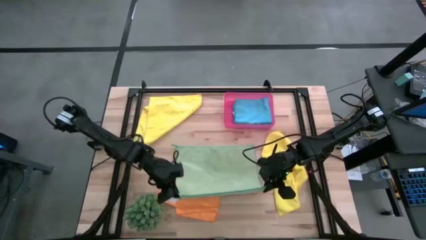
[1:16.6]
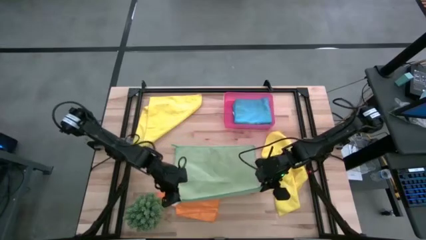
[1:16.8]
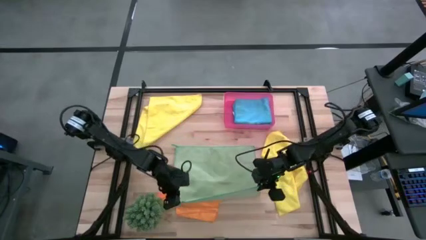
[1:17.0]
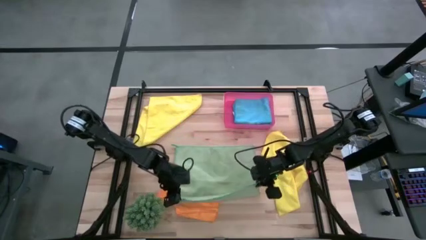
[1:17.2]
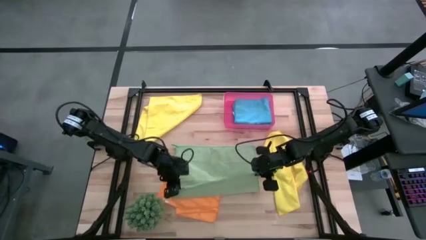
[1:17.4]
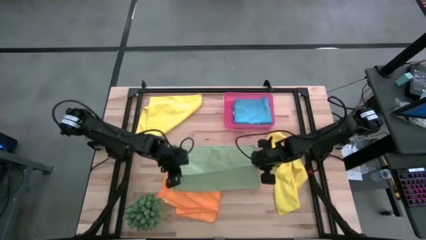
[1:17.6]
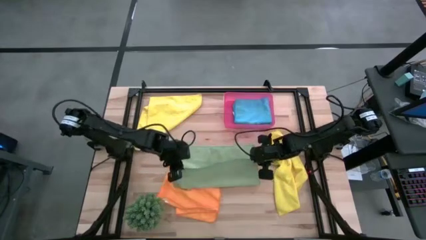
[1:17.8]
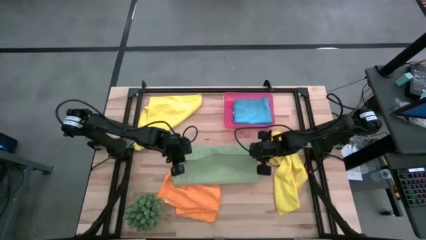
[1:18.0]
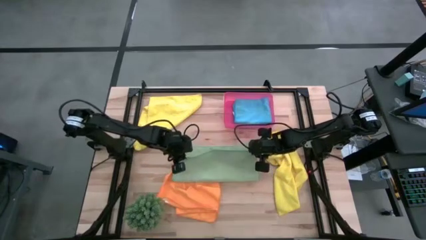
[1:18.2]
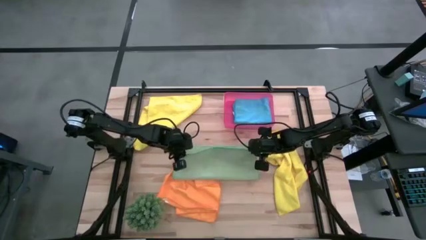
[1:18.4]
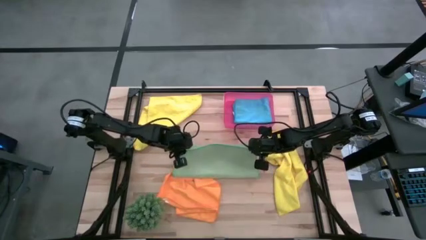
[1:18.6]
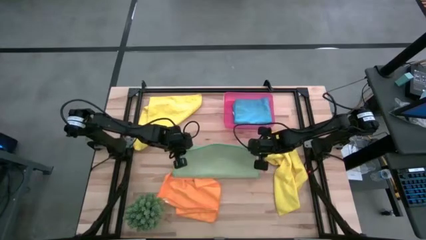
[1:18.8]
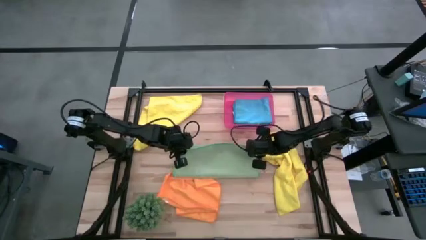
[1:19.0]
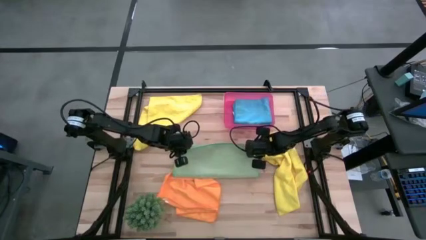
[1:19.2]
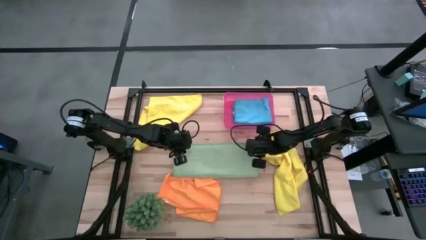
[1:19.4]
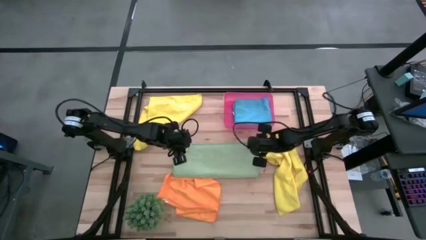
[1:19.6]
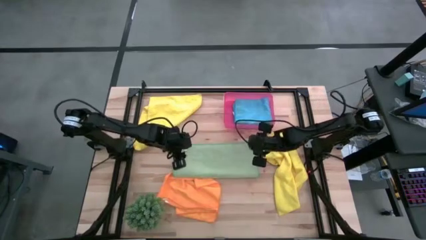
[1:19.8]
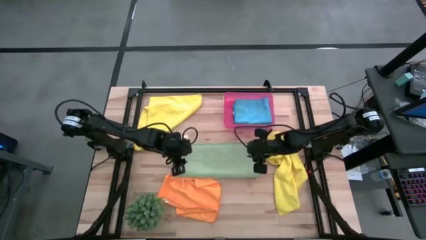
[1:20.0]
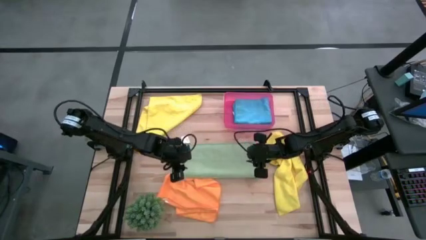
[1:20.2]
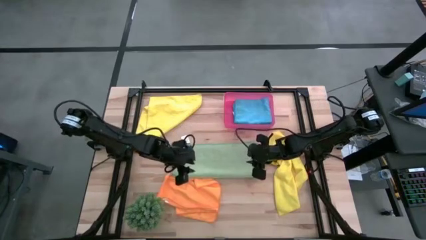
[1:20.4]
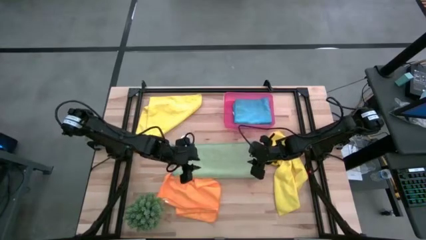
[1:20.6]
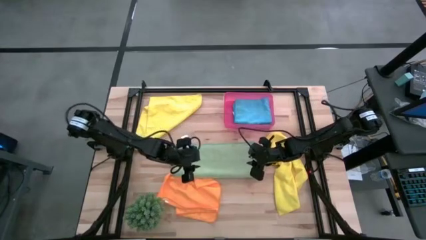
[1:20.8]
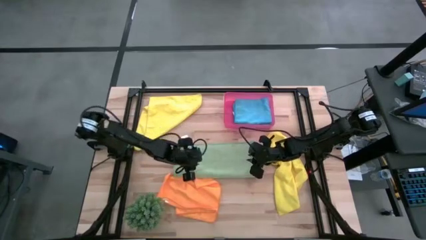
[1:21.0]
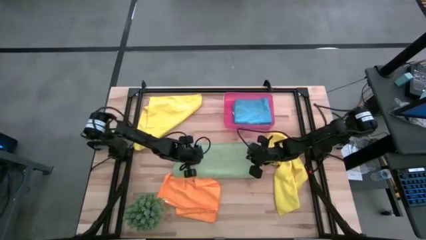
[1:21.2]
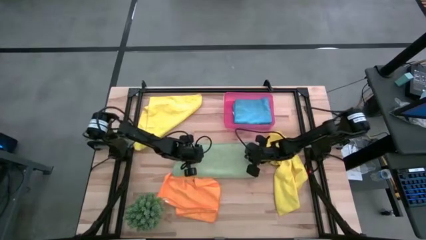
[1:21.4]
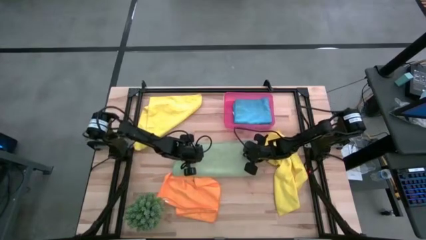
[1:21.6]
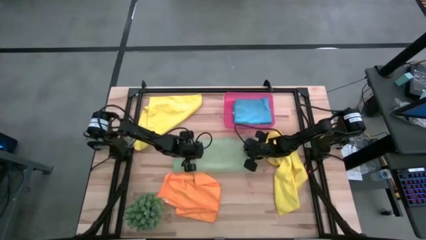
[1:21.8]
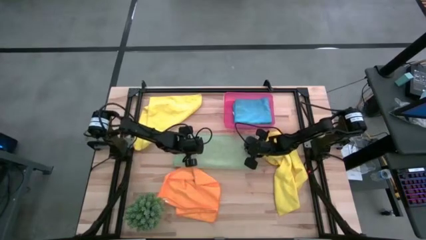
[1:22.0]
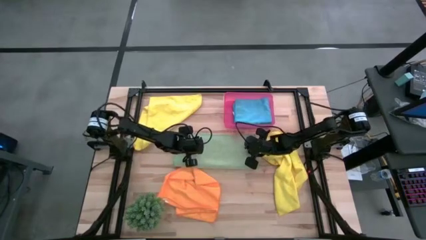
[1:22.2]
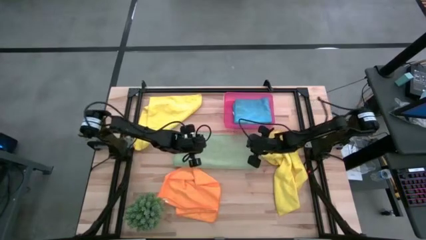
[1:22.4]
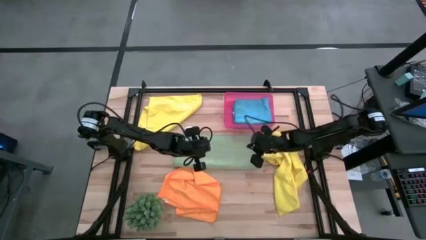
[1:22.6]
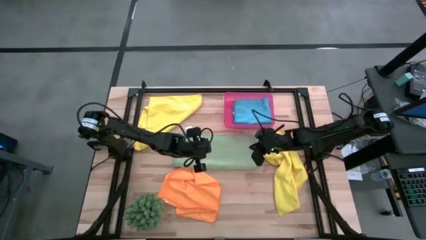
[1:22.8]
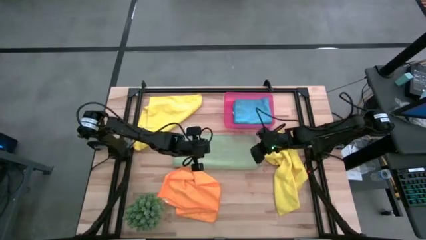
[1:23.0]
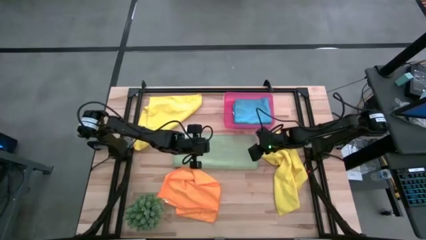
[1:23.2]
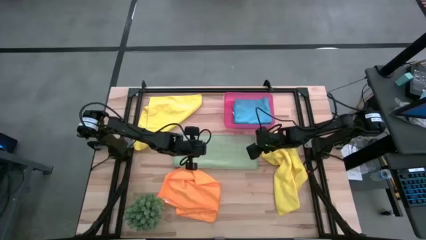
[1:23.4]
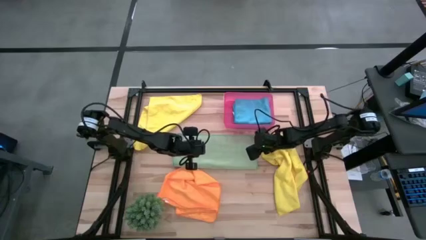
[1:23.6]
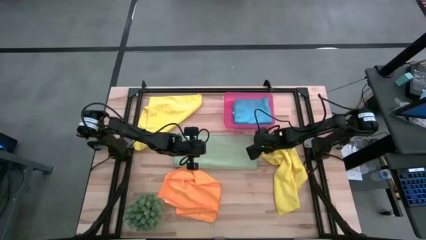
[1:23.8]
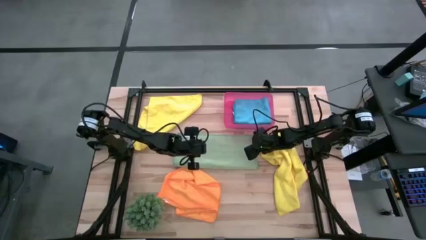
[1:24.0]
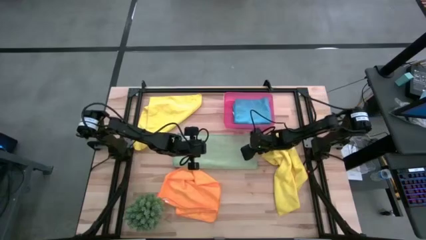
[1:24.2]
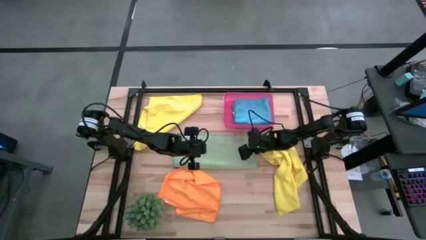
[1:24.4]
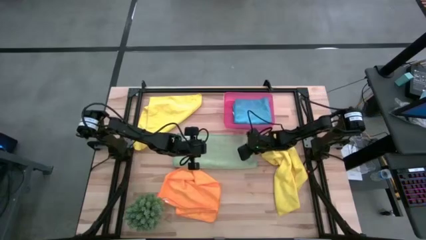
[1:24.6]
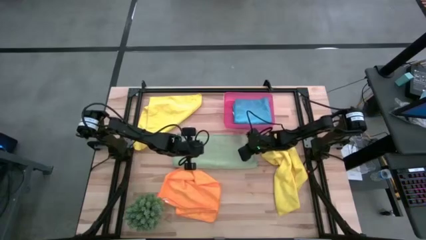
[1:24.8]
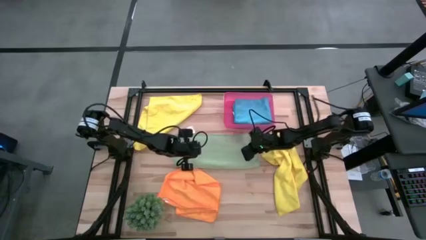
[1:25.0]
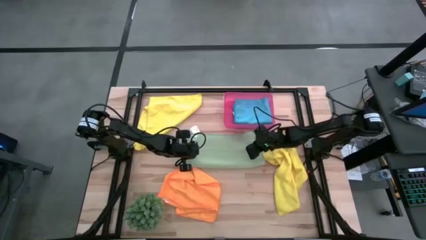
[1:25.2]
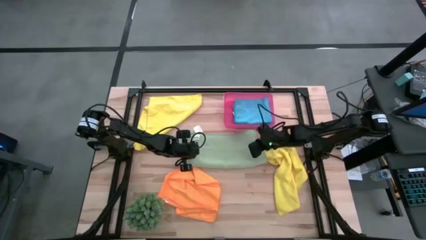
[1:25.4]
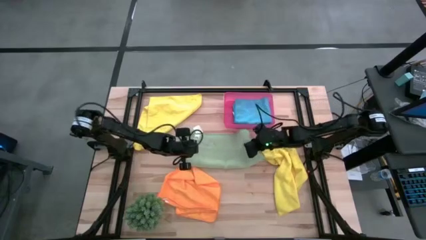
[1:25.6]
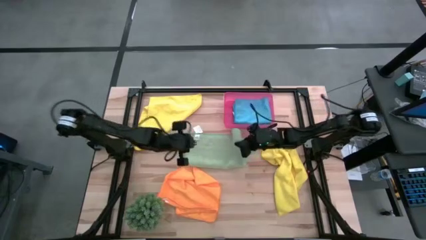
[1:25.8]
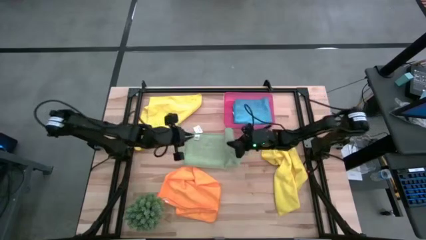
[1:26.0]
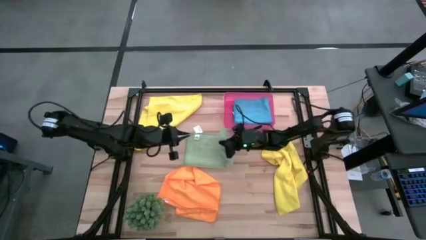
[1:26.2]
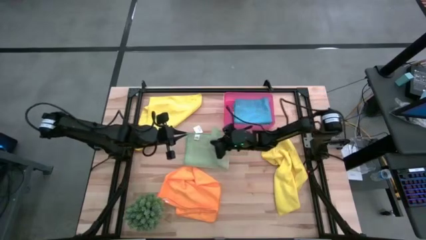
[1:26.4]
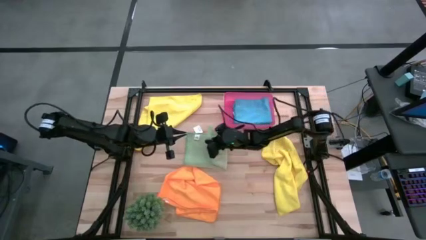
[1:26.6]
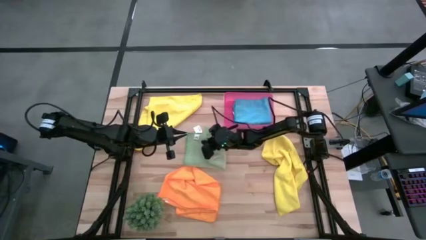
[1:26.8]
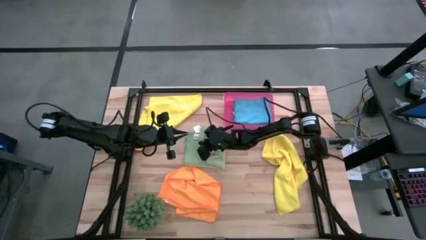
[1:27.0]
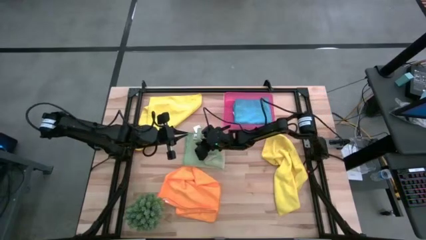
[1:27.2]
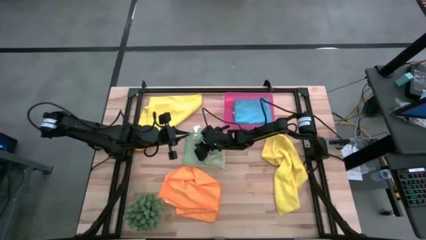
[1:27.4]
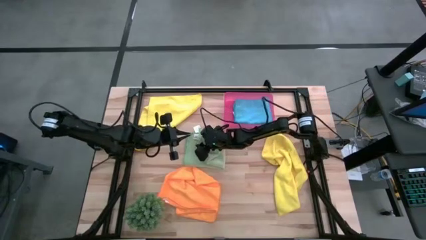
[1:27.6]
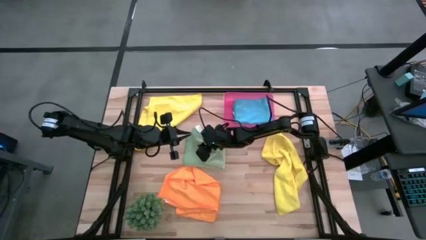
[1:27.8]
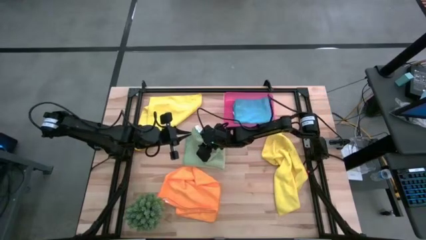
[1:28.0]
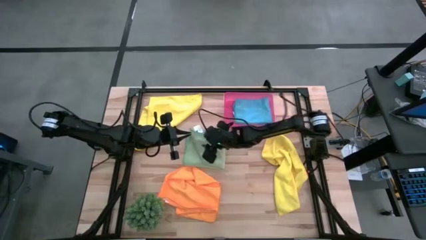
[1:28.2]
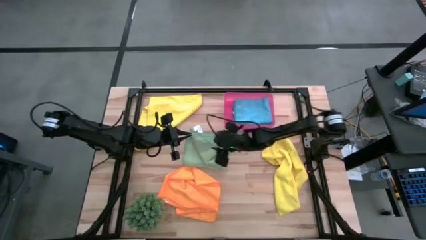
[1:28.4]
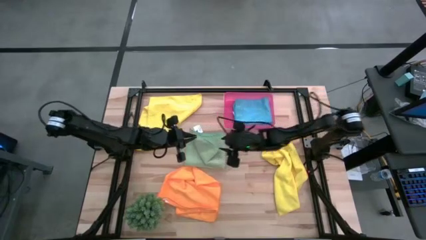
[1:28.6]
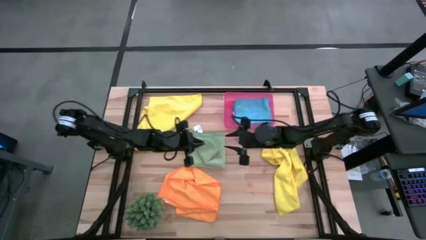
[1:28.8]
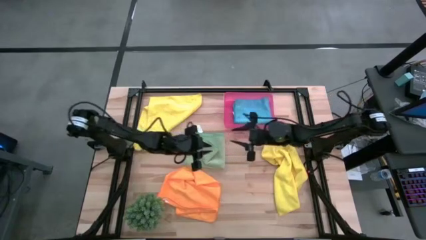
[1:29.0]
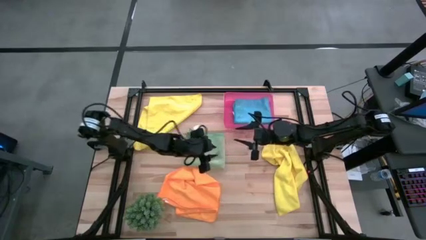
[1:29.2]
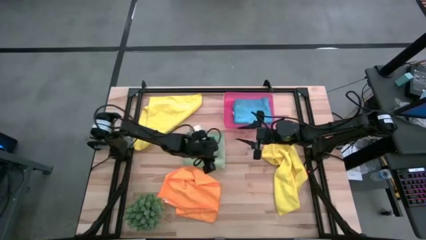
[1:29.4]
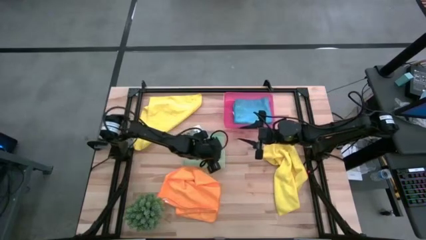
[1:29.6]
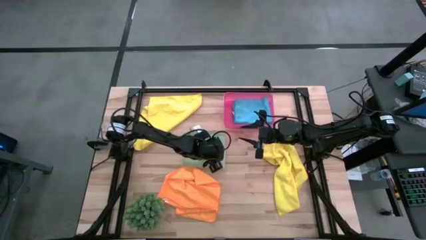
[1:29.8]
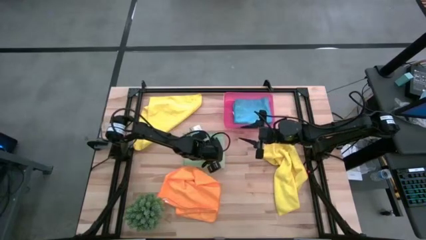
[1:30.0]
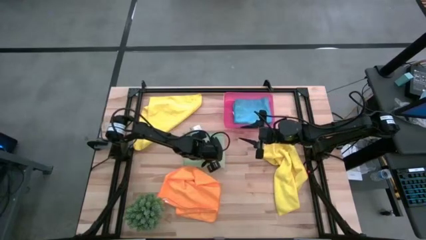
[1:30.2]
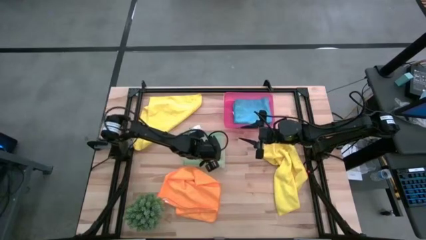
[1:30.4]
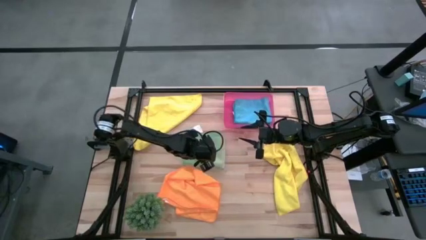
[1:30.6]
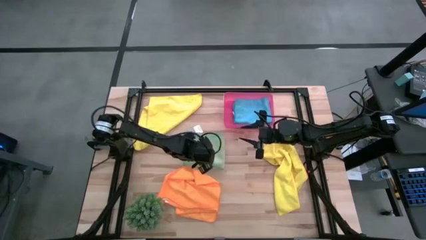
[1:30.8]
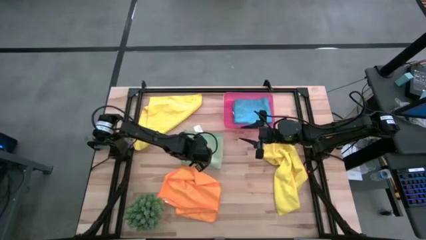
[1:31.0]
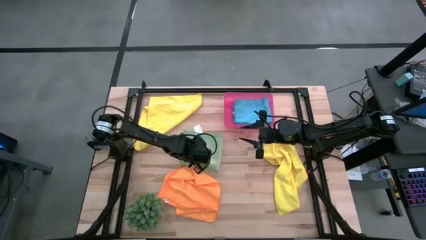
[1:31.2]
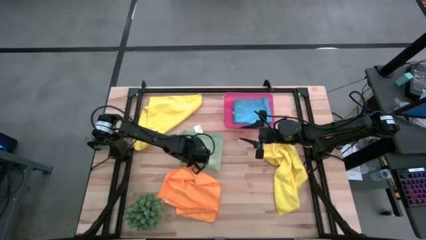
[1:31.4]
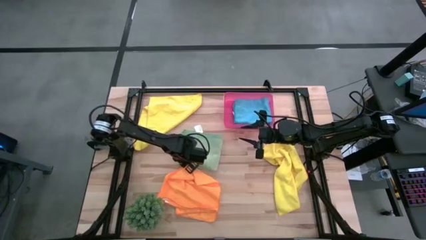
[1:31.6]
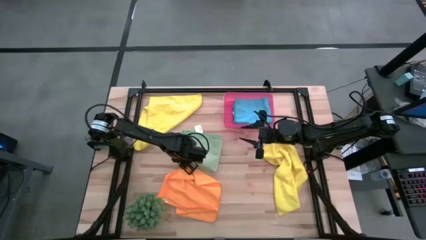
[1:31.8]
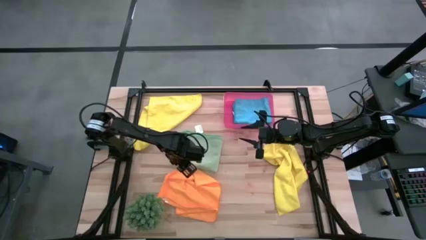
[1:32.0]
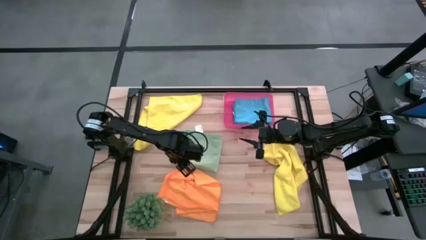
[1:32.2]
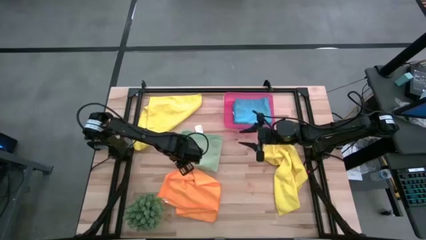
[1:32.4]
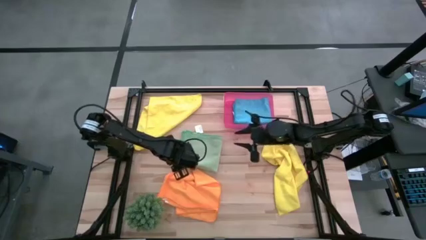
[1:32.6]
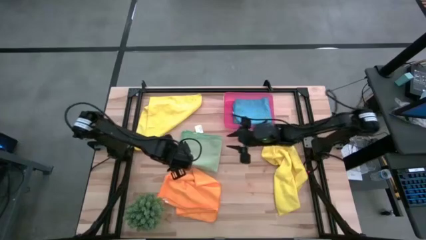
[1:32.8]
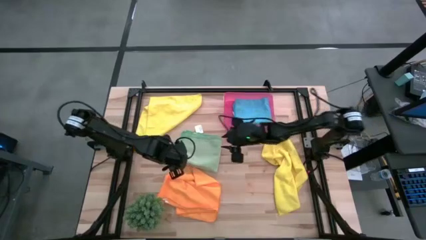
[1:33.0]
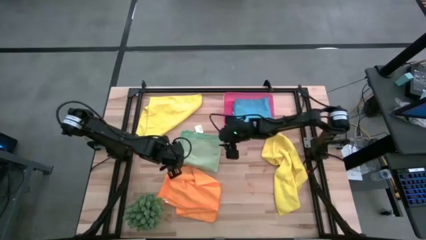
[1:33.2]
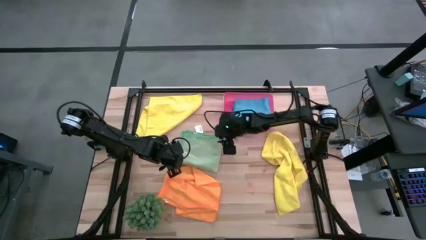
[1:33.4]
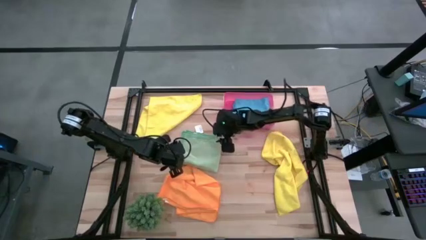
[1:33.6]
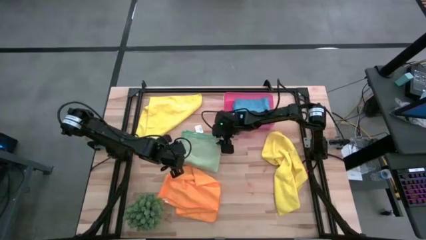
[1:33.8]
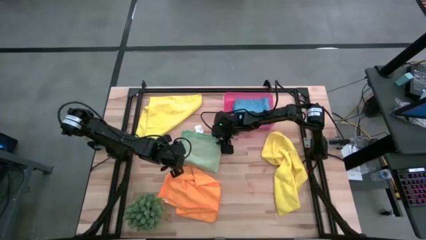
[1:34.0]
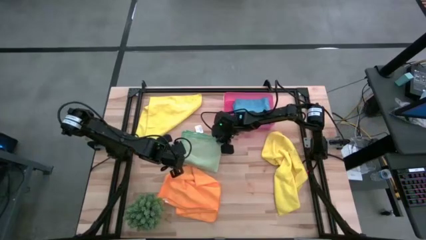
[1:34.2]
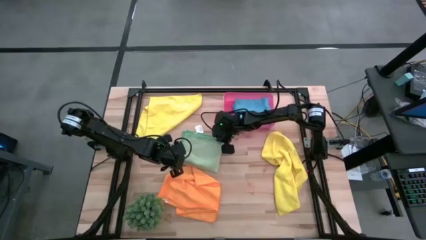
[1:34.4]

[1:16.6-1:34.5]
Task: Fold microfiber towels
Fold the green microfiber cloth
